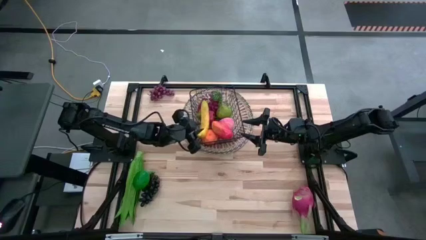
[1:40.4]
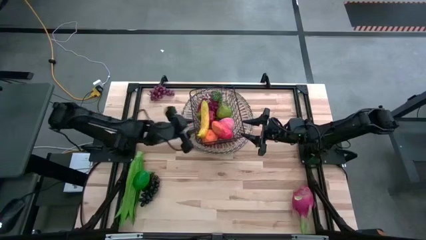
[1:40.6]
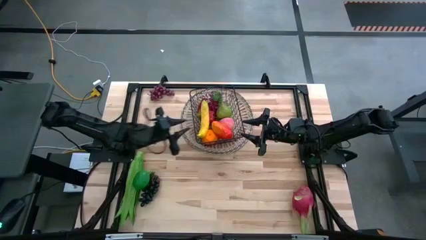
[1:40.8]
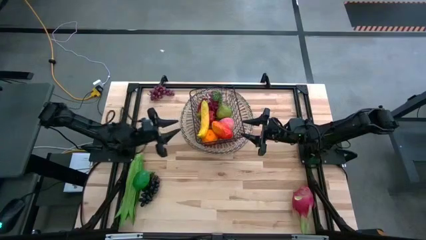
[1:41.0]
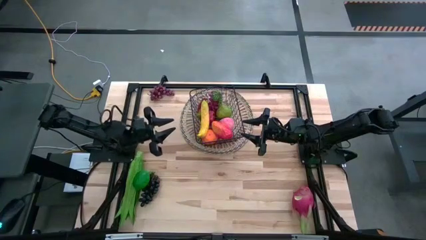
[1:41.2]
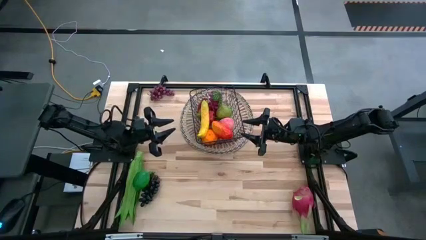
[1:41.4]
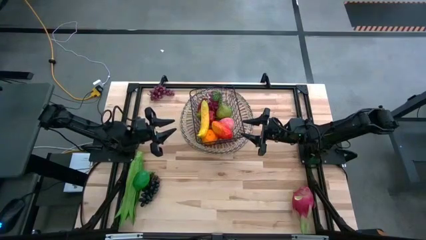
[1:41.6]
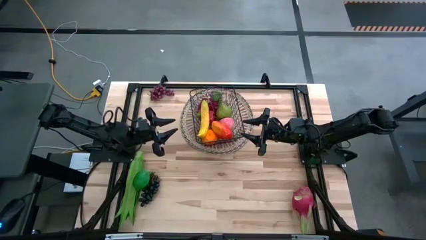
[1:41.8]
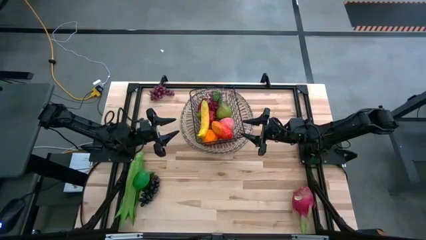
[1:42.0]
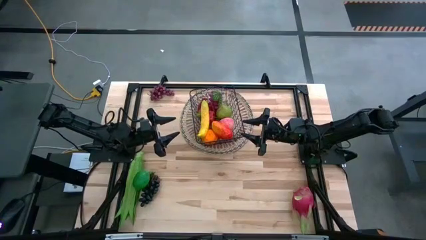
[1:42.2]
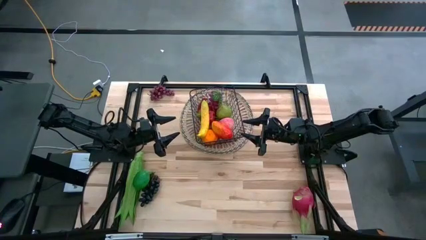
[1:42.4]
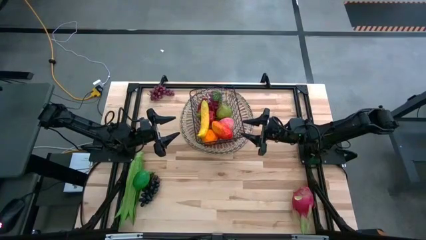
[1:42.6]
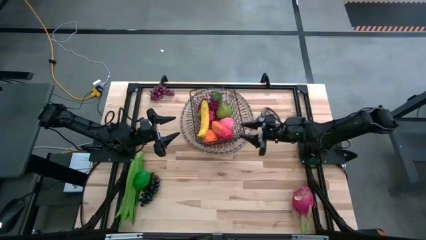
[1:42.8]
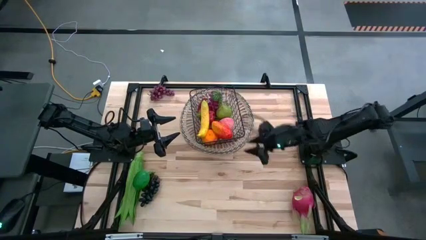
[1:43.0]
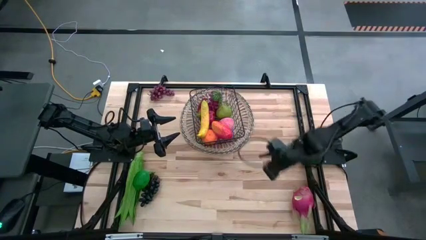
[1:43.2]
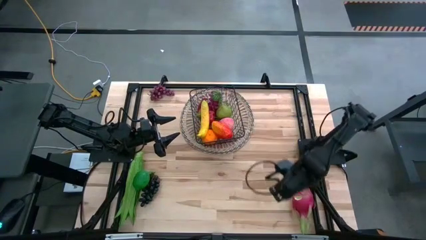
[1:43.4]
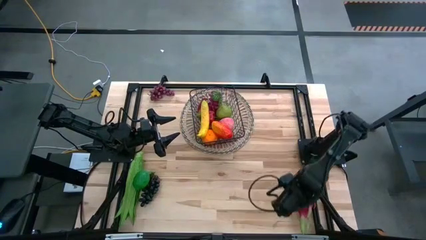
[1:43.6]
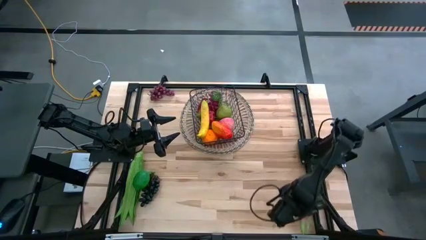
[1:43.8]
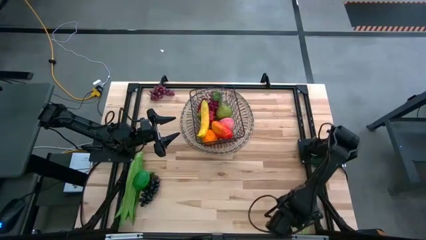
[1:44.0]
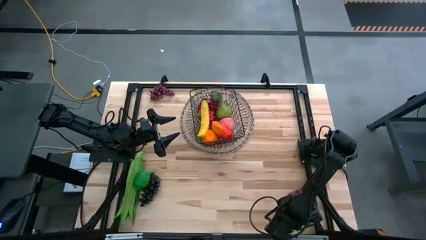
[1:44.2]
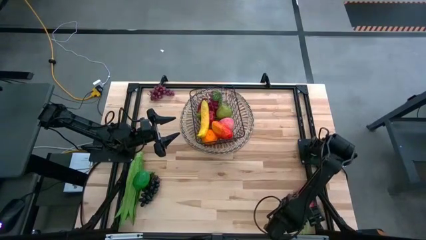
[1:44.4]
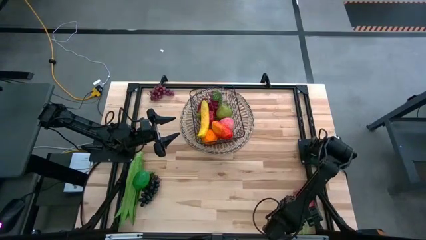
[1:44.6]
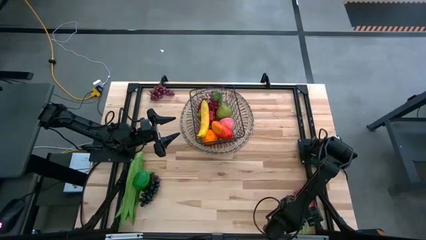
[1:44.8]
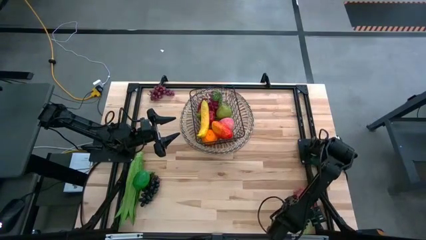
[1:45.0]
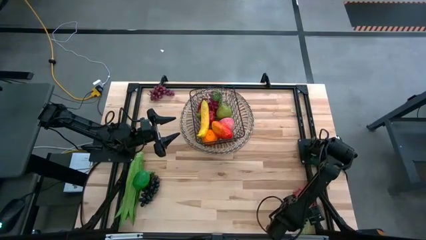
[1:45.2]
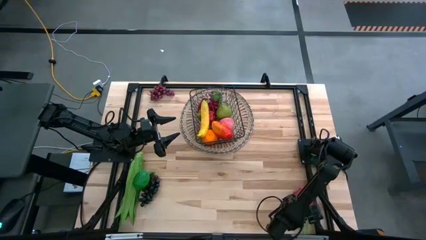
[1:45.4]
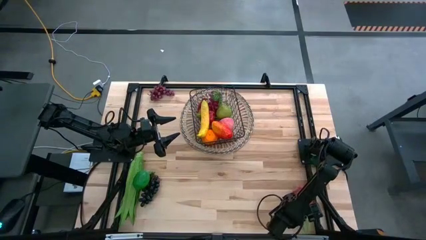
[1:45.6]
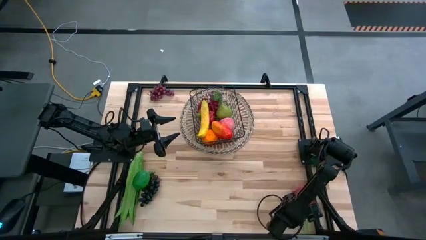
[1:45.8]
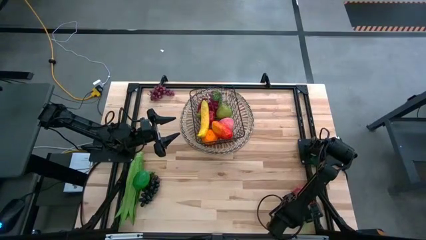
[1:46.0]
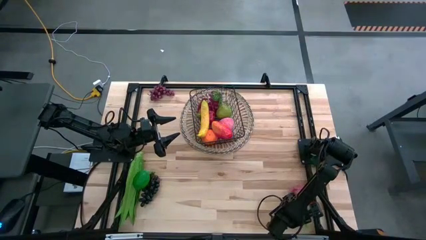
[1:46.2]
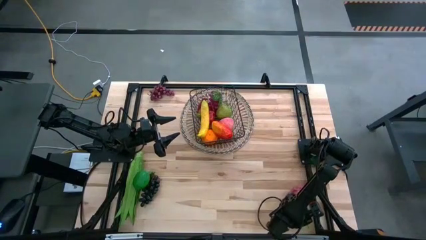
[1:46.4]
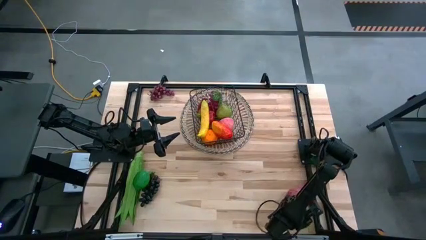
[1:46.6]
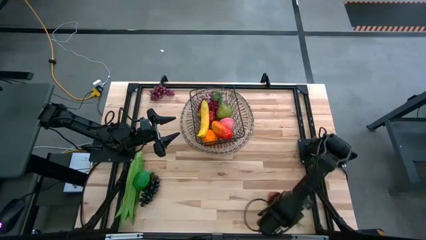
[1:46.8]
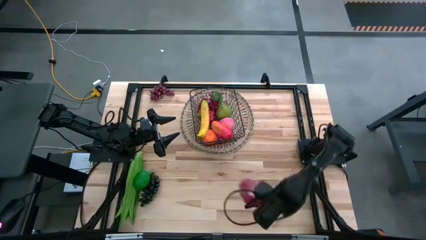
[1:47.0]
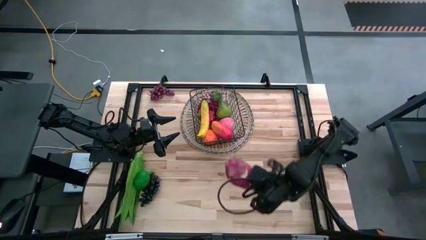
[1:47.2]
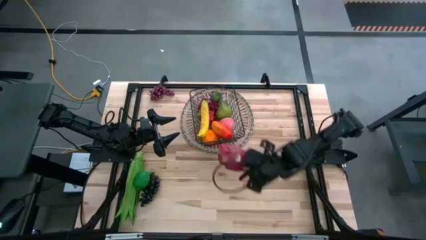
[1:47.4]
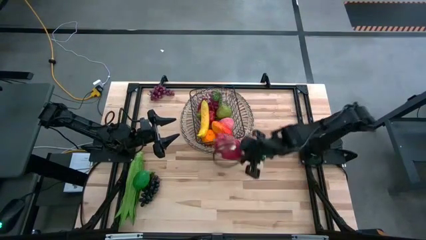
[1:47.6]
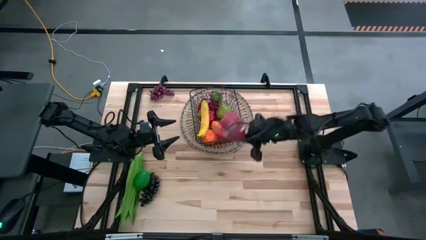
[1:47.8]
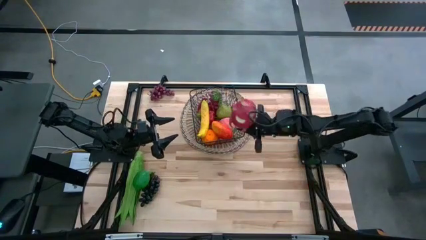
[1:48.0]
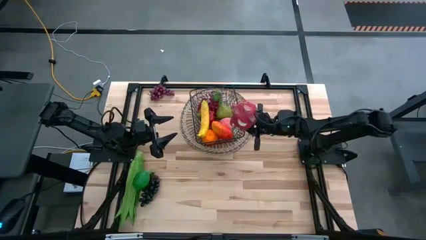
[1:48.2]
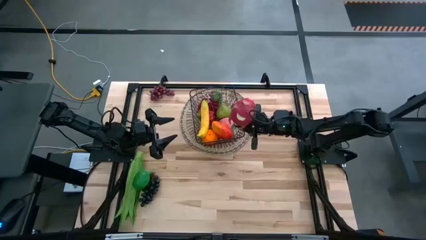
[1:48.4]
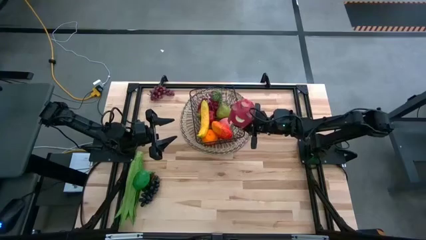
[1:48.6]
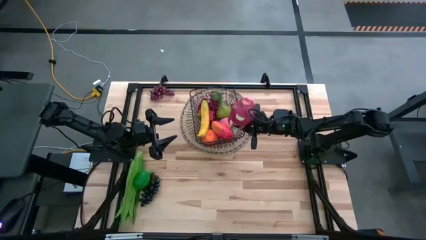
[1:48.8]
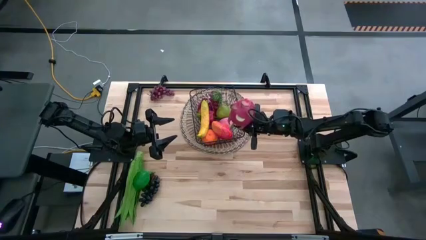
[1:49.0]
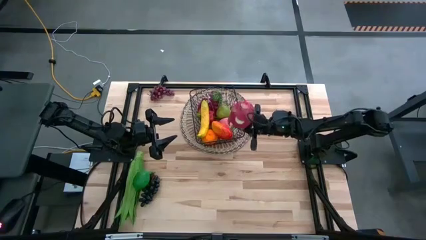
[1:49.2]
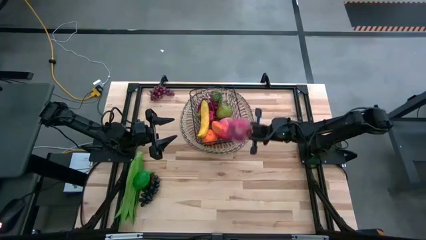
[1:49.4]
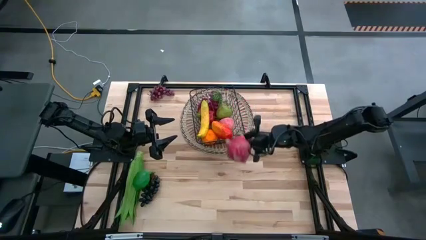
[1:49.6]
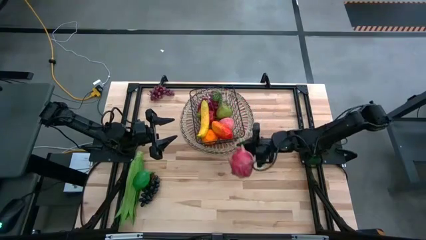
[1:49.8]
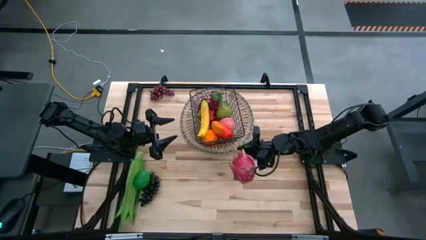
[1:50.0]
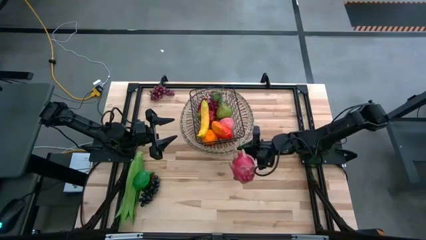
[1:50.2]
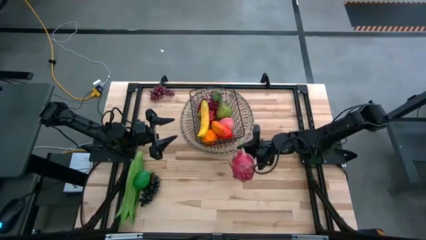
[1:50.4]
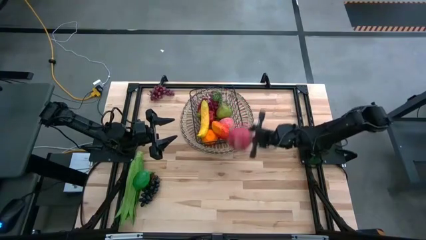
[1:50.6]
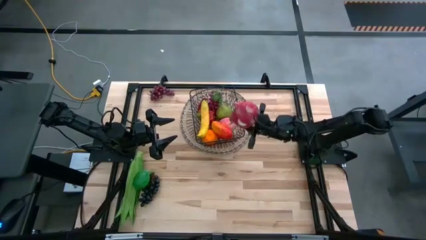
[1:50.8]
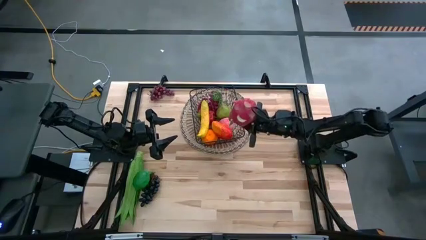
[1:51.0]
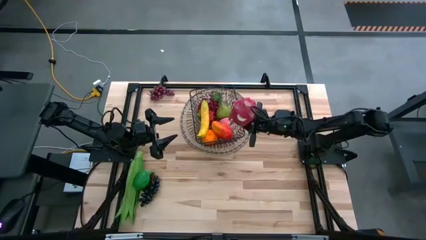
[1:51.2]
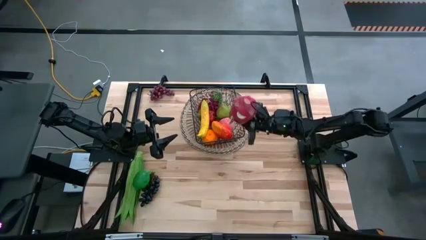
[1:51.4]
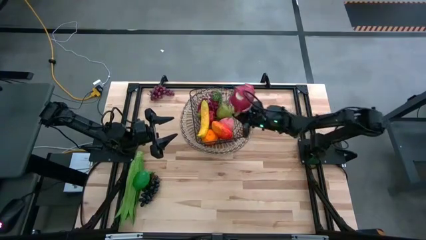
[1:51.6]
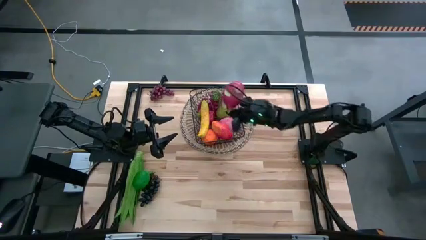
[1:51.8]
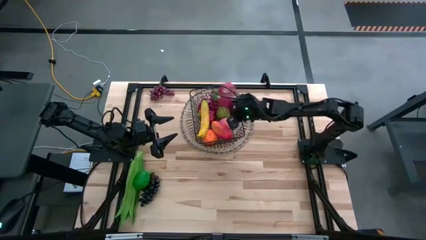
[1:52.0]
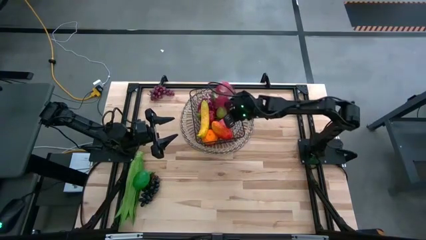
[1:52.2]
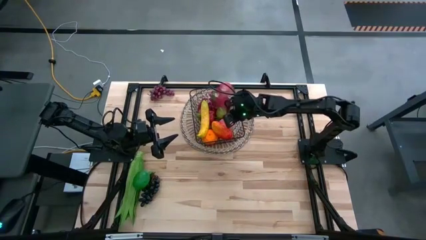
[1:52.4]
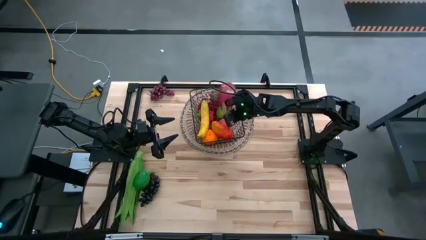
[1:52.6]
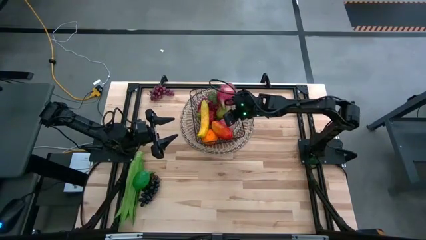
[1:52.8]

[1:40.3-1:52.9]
Task: Build produce basket
Put the pink dragon fruit into the black wire basket
